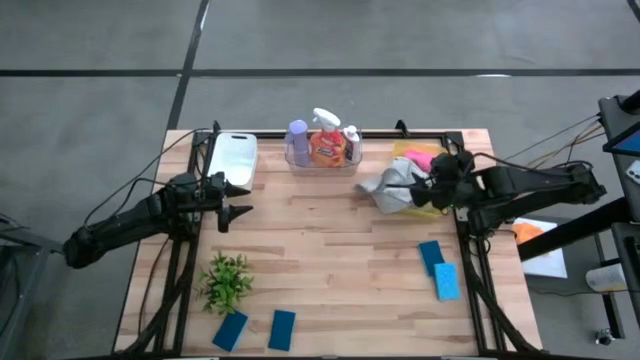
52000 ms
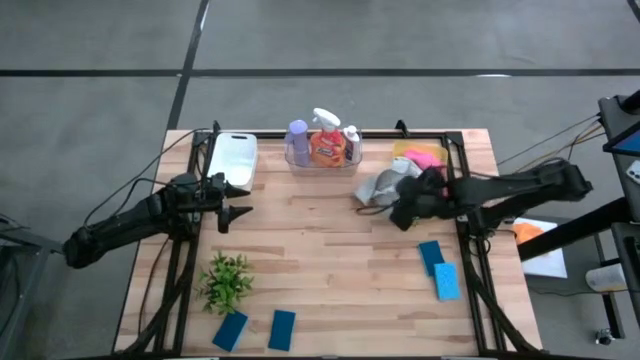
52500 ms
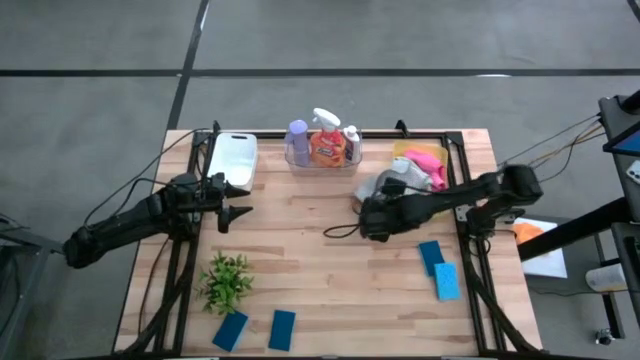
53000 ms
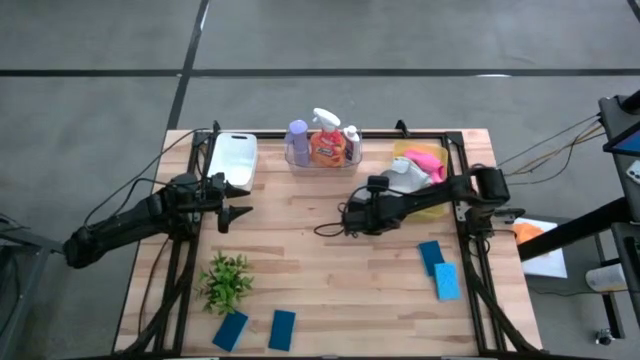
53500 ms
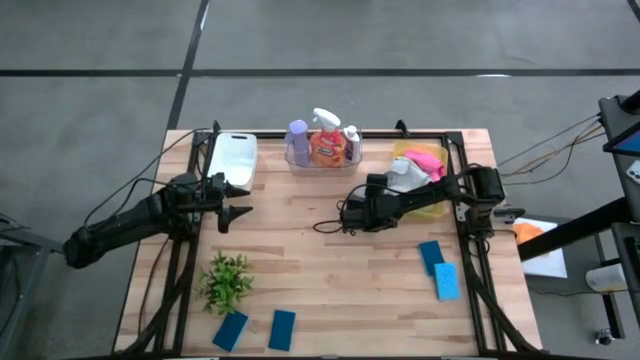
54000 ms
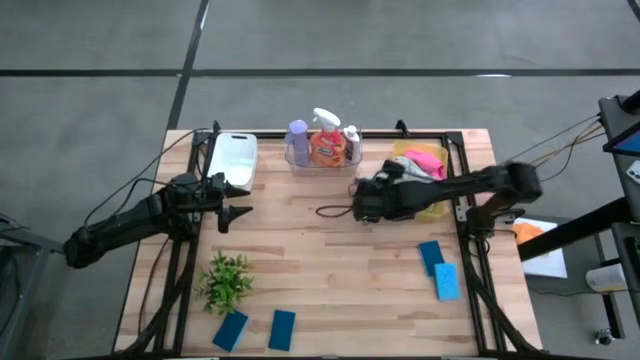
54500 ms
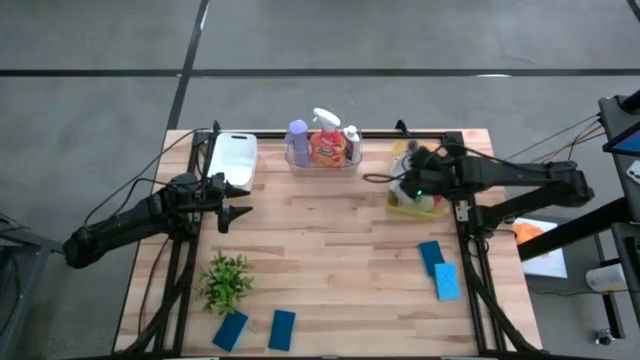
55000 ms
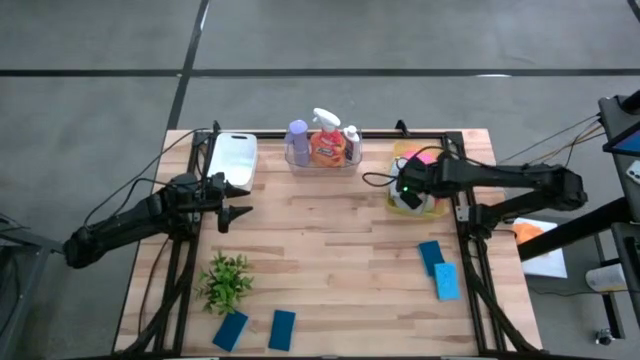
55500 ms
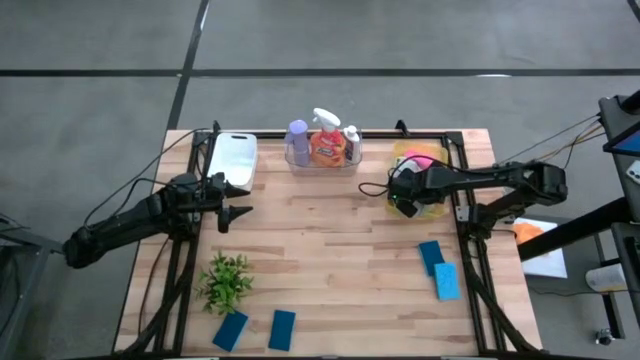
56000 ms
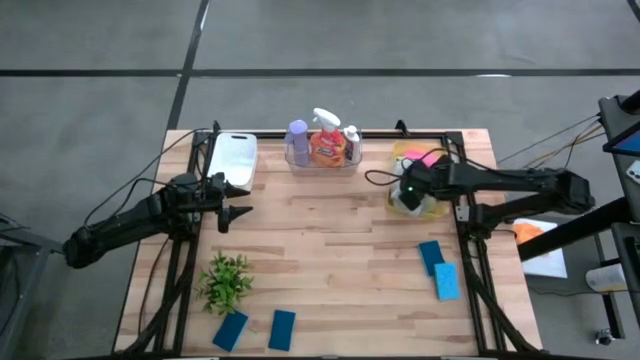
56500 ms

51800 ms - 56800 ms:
Task: Pick & Place Kitchen Items
Put the grey towel into the yellow bin

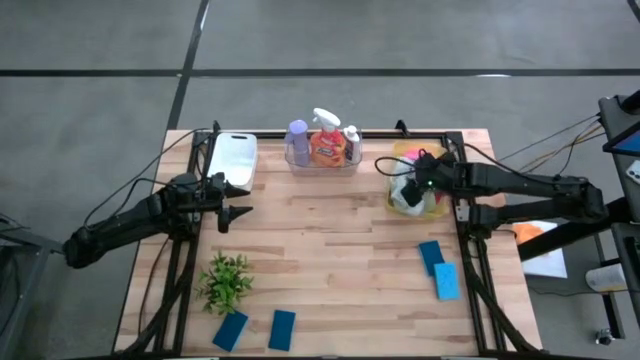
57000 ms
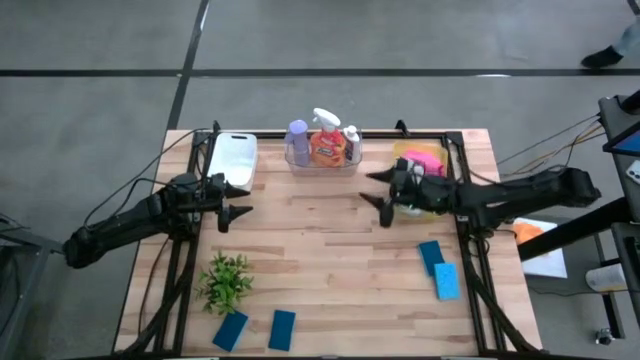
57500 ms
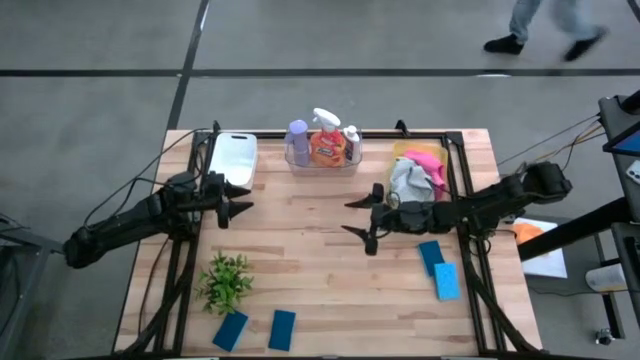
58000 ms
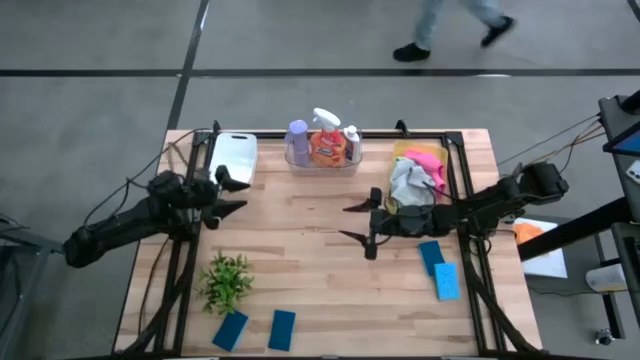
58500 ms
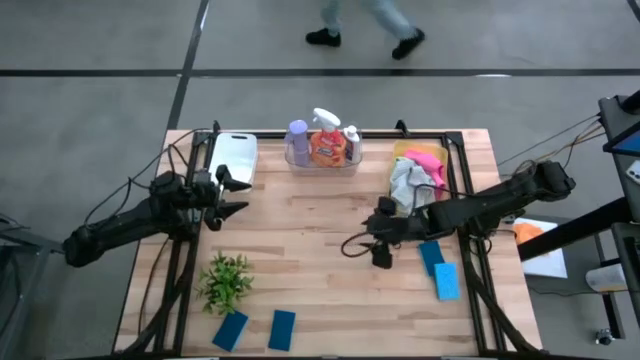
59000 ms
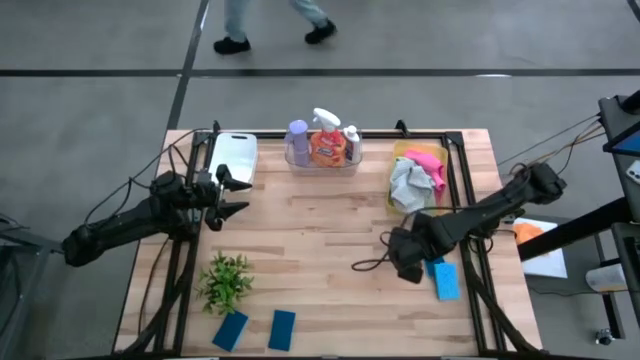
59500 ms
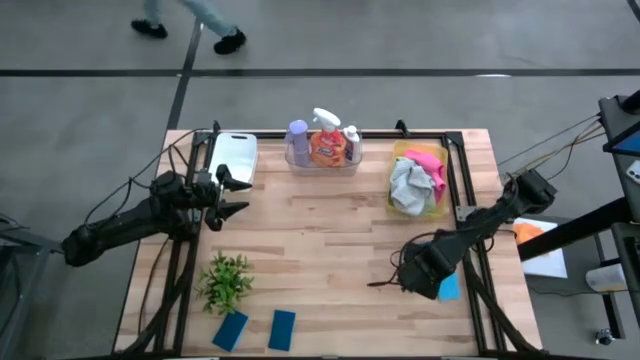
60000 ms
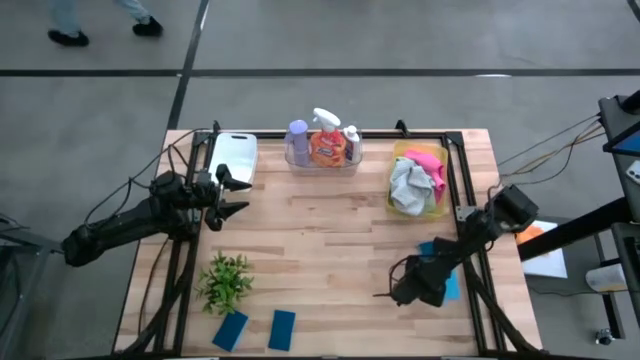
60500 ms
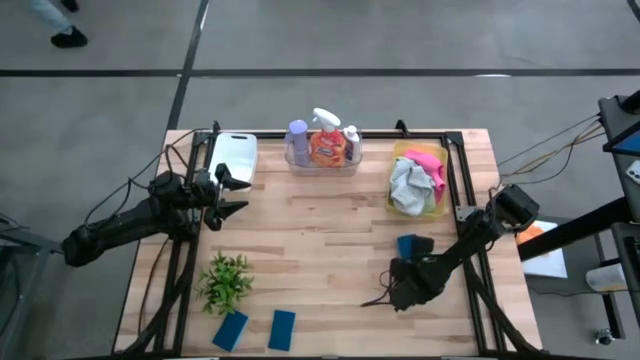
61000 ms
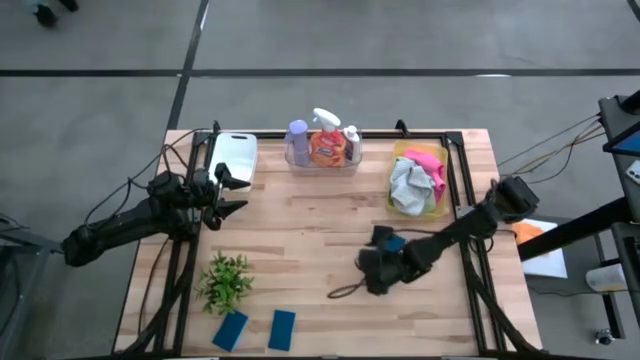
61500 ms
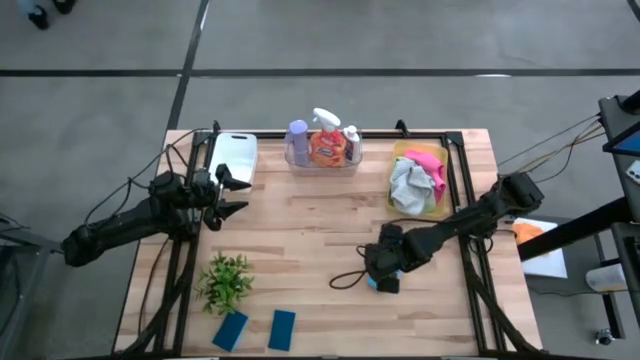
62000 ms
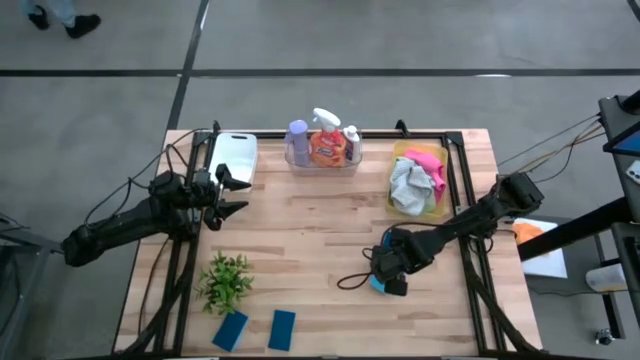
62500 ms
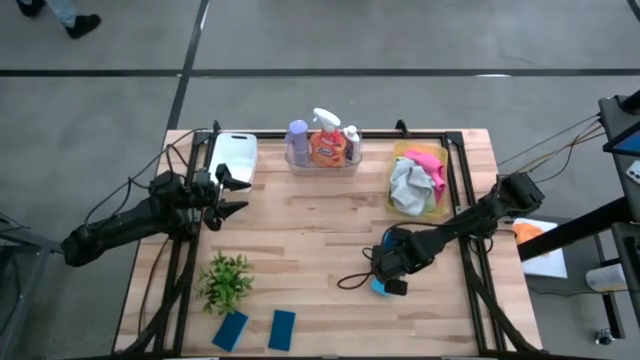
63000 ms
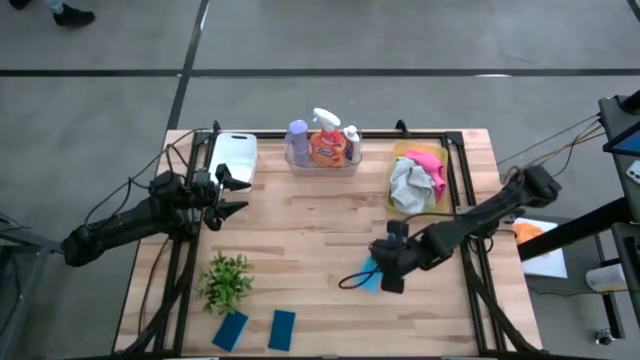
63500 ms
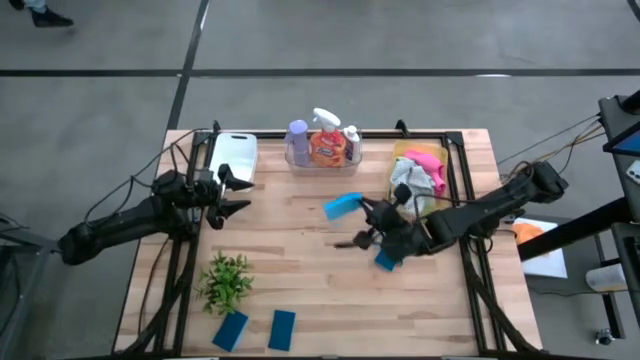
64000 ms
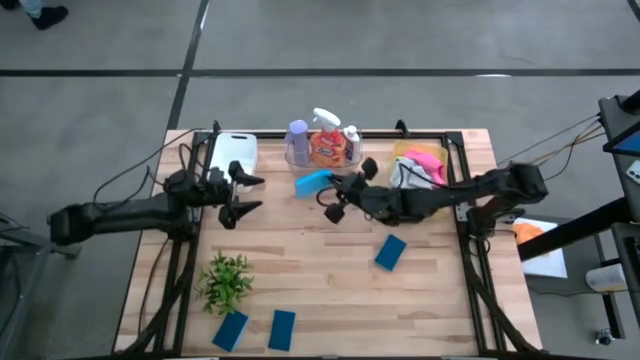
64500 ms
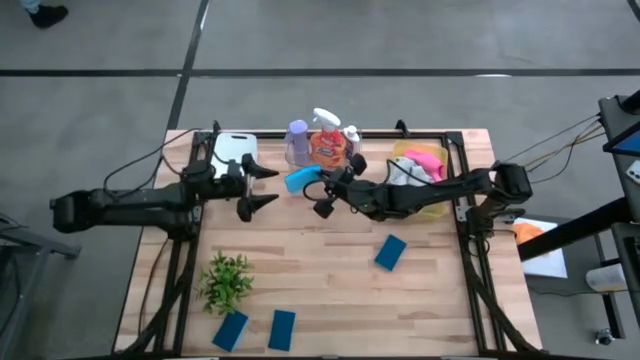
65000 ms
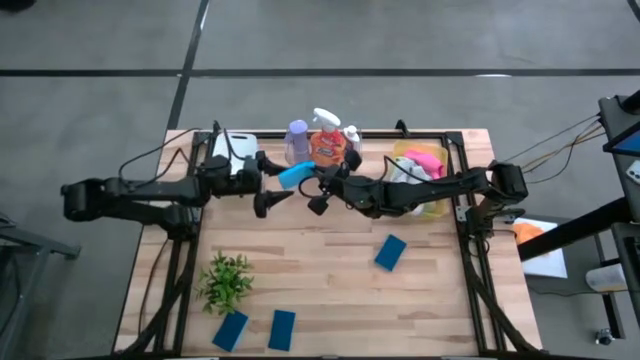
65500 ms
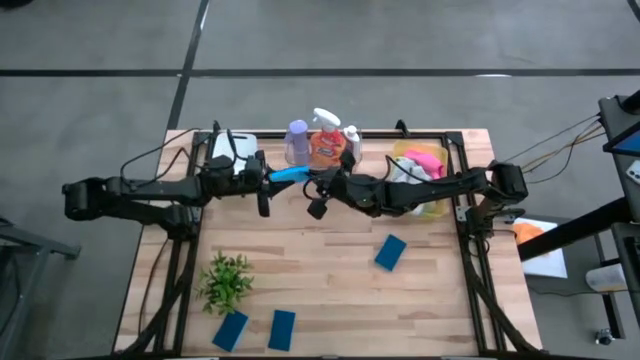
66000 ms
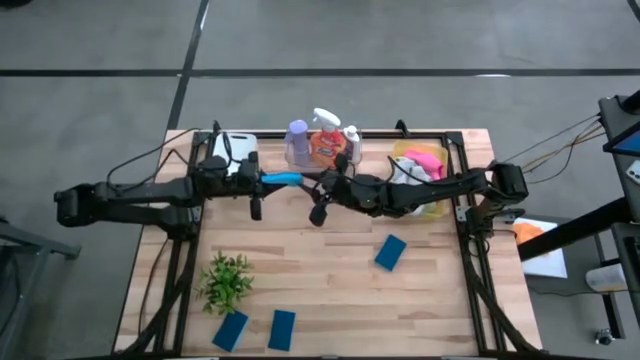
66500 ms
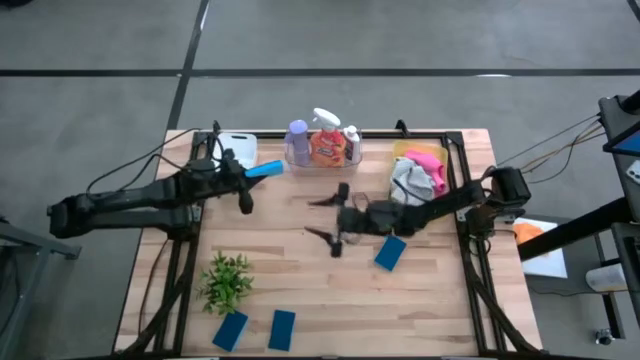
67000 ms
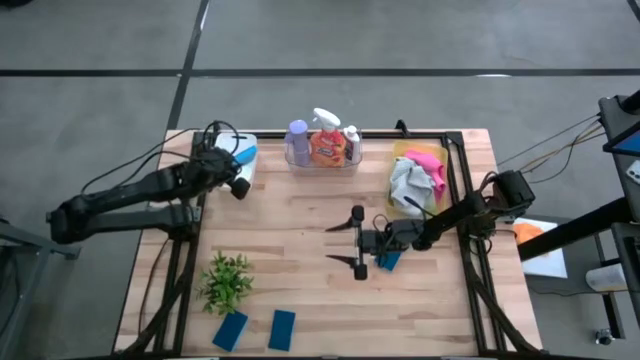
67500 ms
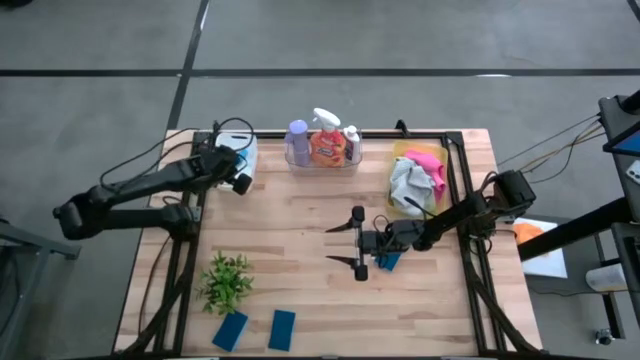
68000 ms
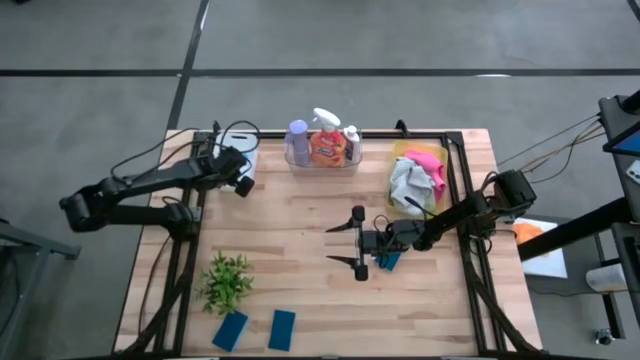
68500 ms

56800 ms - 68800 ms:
Put the blue sponge into the white bin
